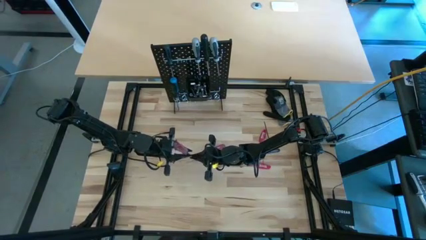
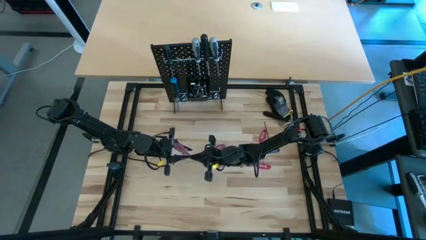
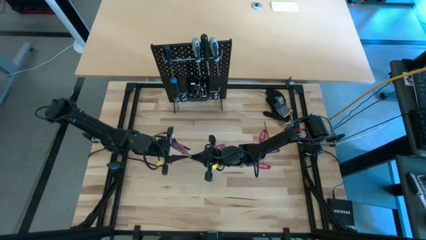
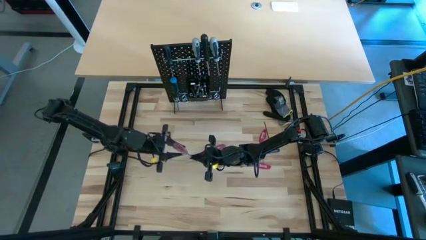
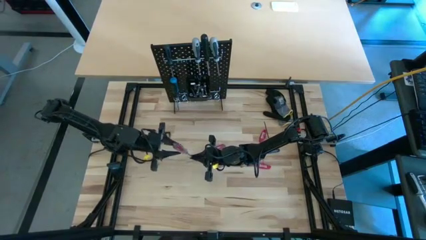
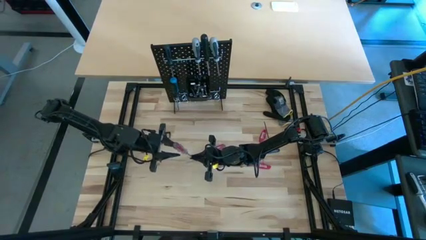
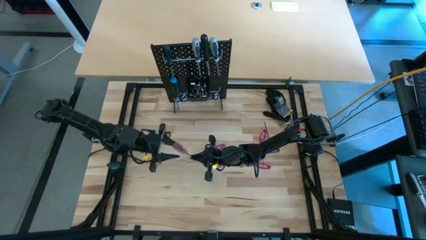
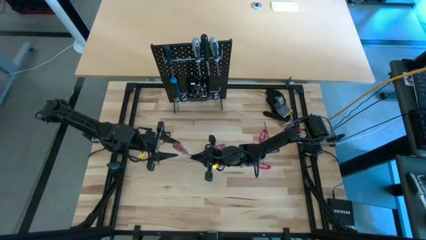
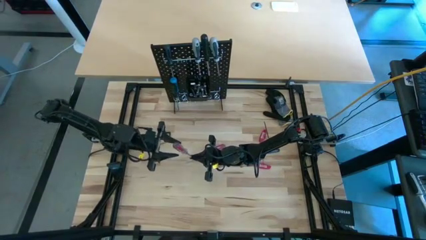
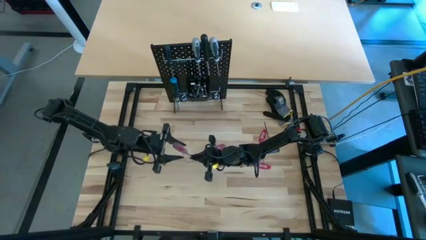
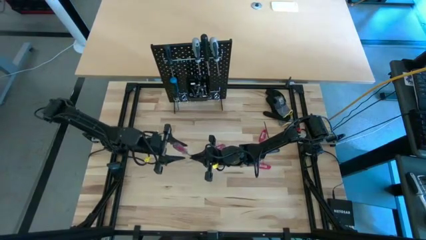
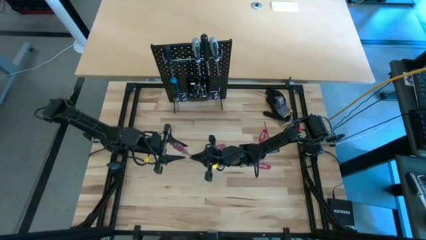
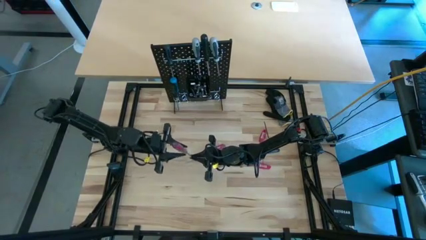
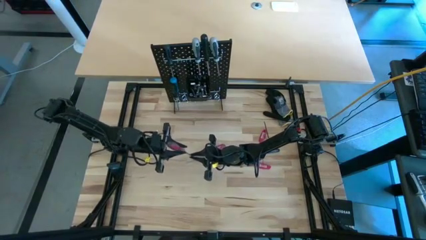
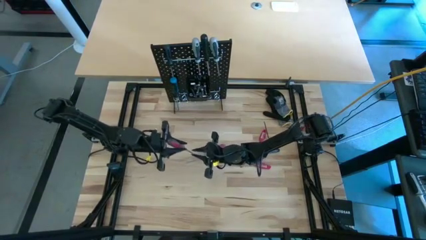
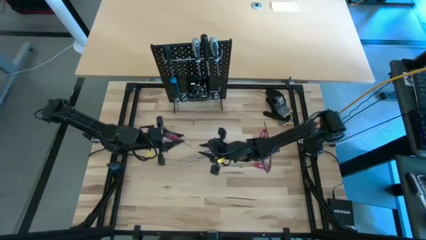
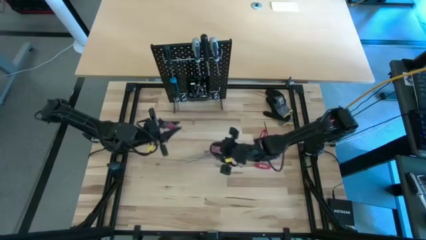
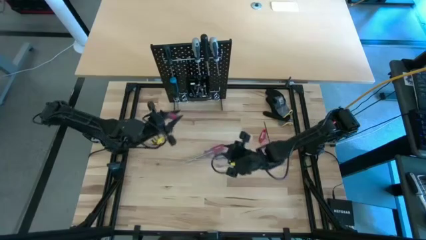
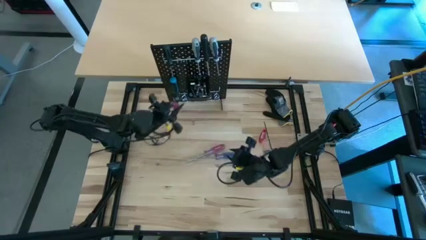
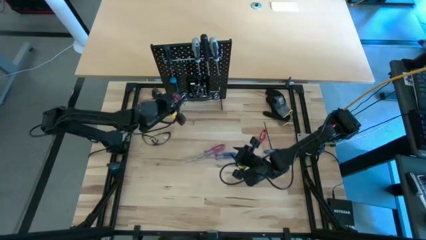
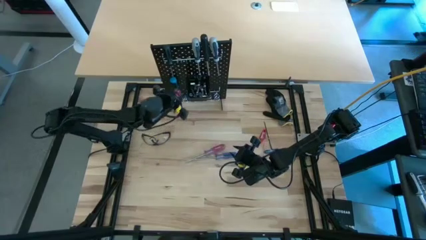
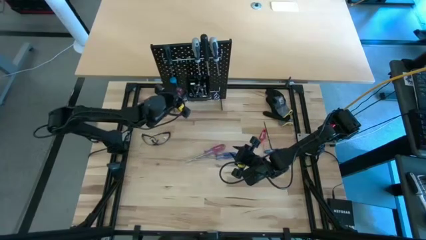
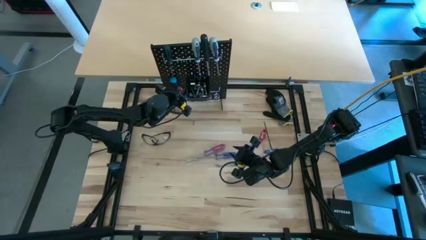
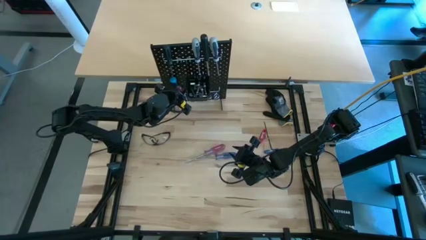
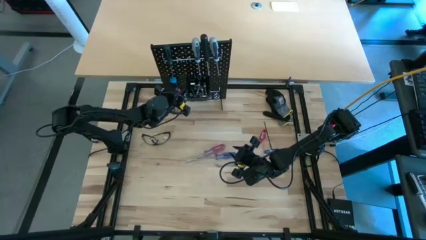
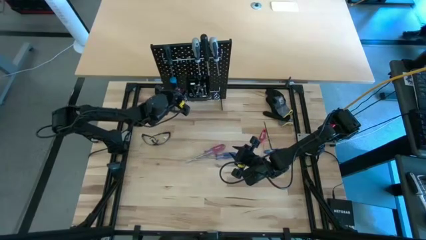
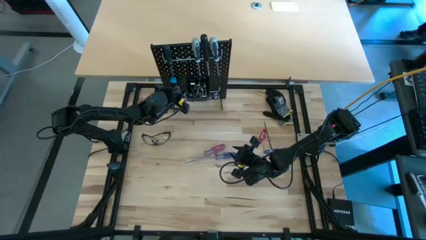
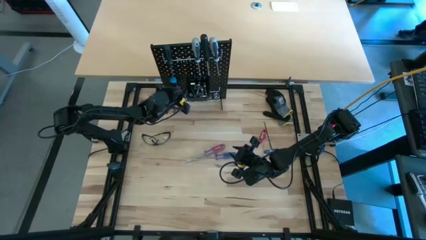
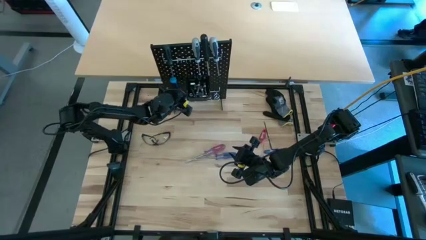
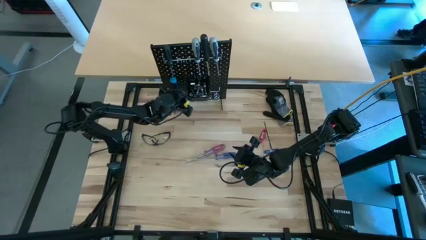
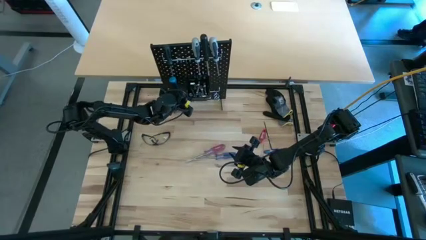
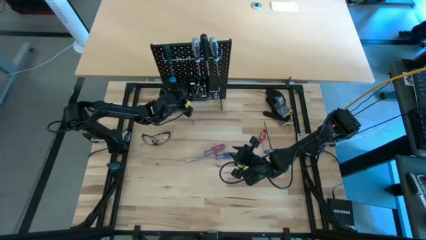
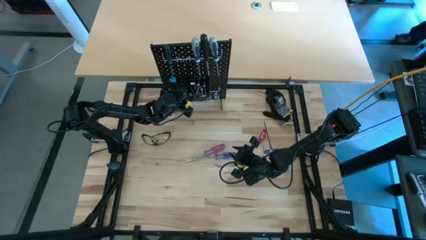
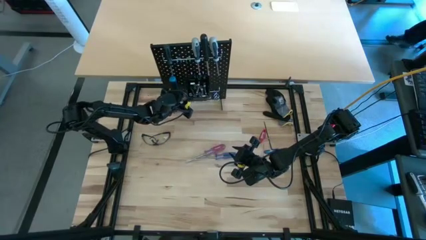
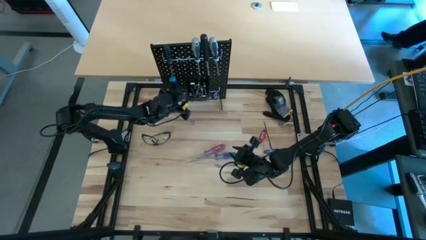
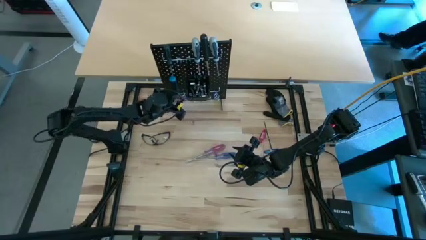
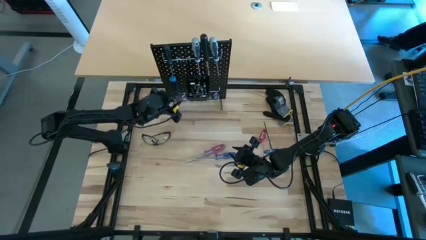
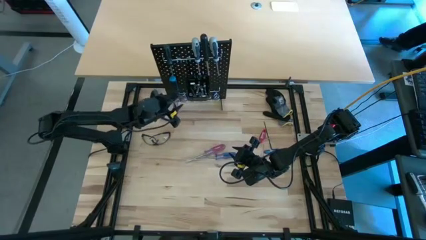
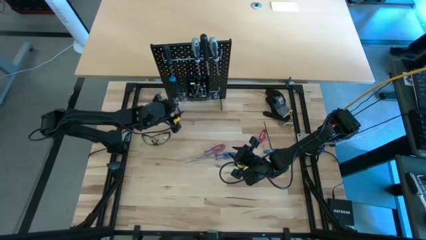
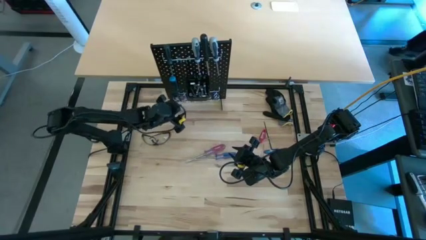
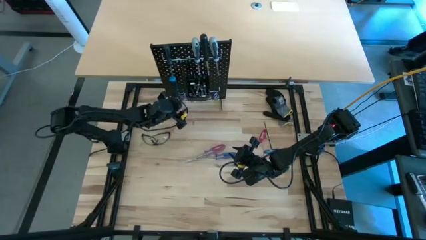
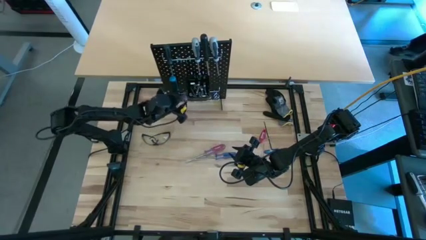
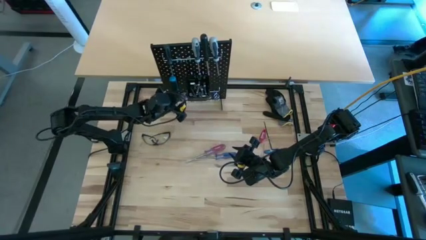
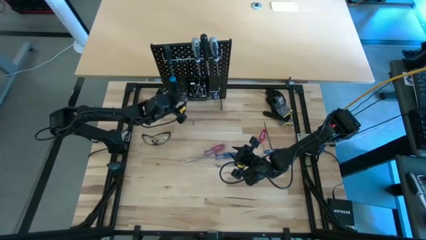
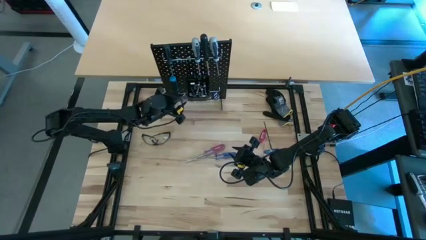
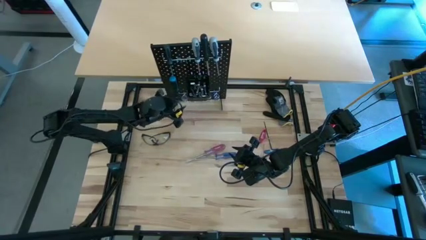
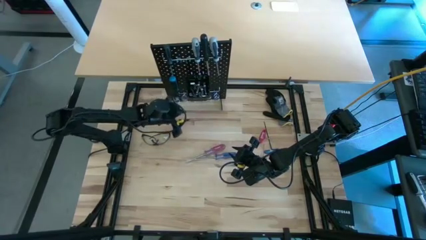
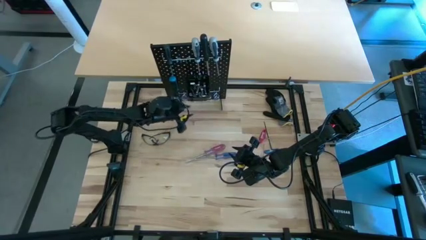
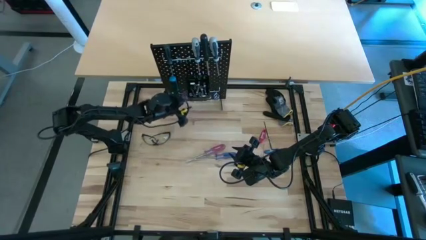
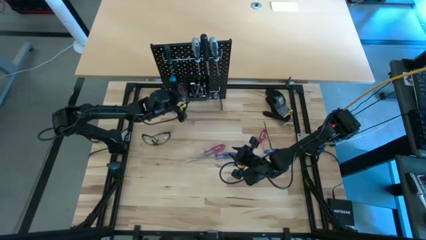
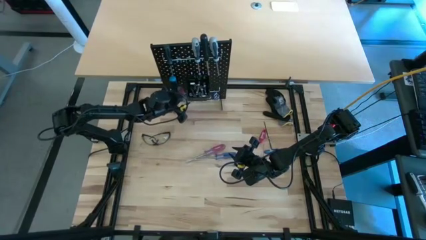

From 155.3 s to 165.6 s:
Task: Hang tools onto peg board
Hang the left red and transparent screwdriver on the peg board

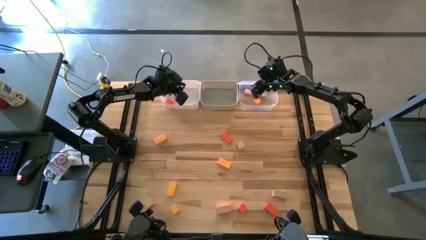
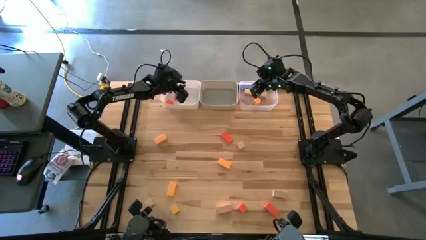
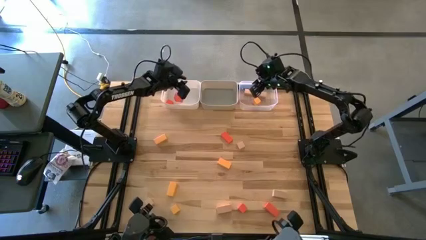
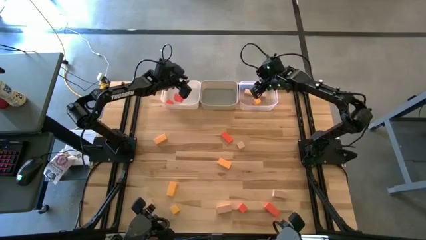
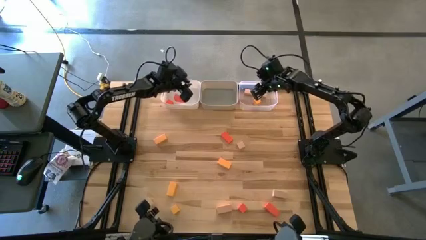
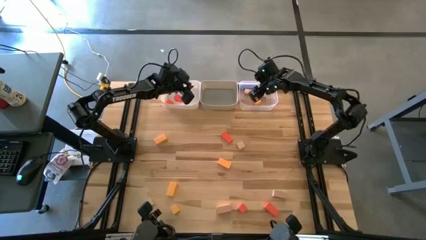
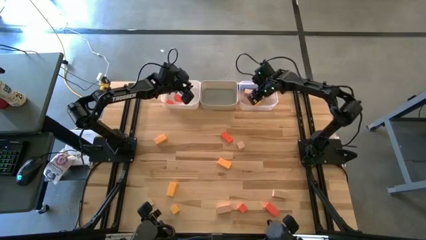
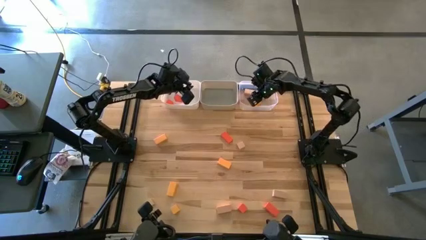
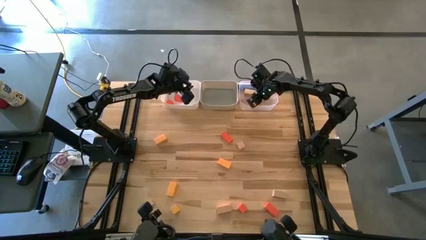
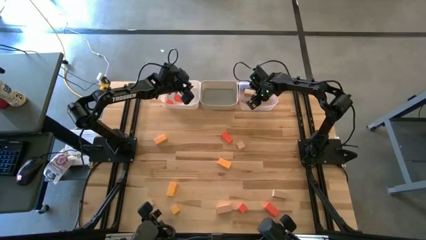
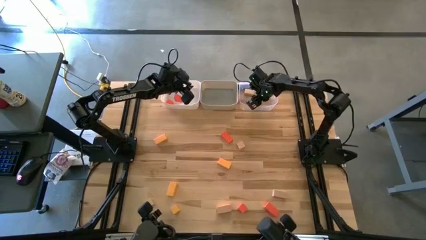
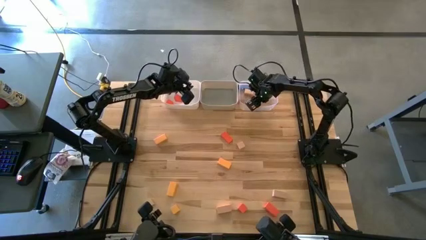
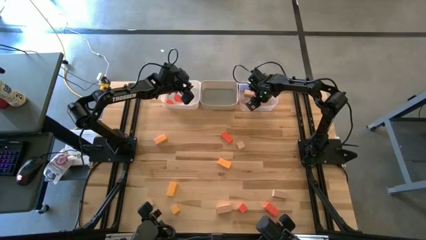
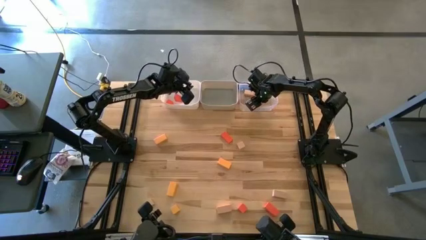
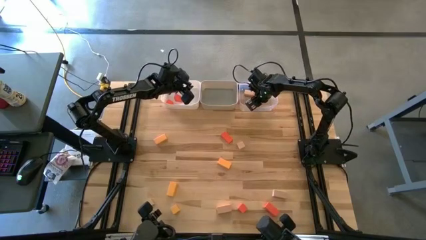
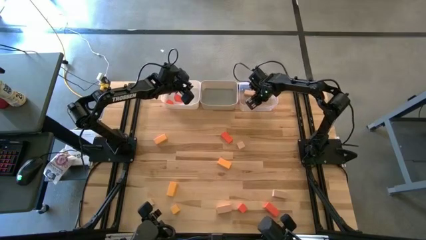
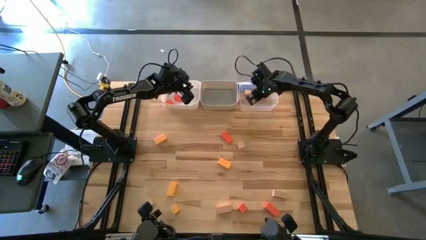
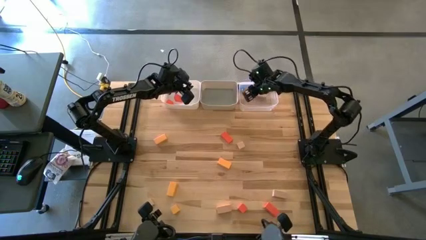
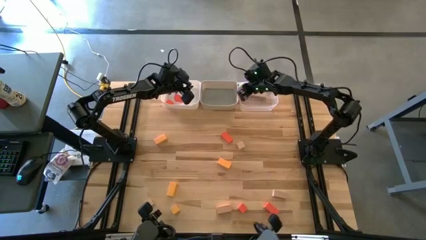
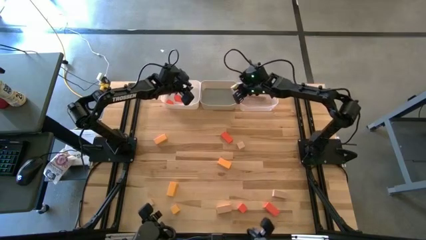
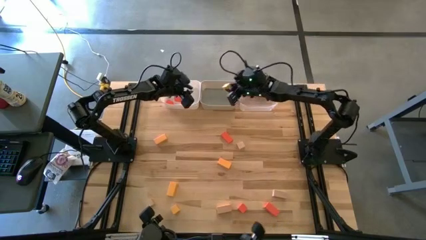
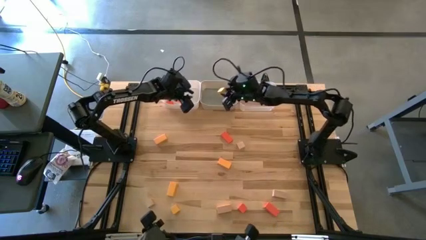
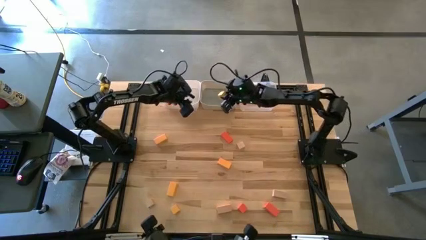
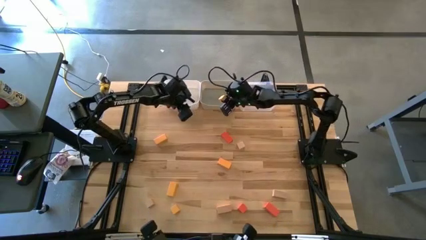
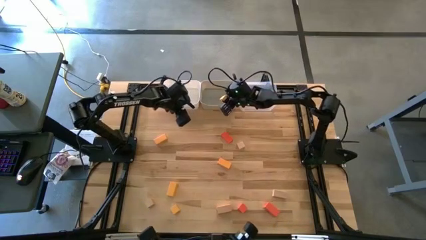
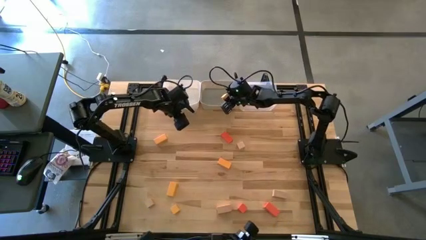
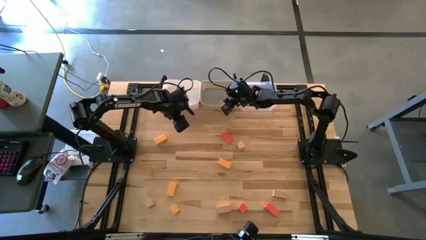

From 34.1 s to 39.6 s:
Task: Sort & place blocks by color
Put the yellow block into the gray bin
